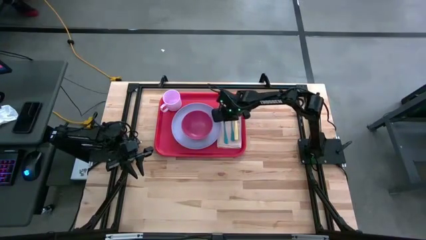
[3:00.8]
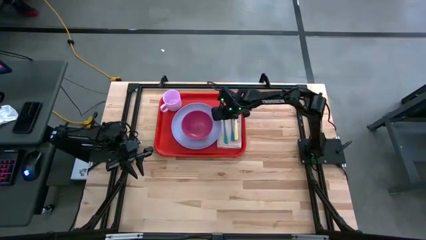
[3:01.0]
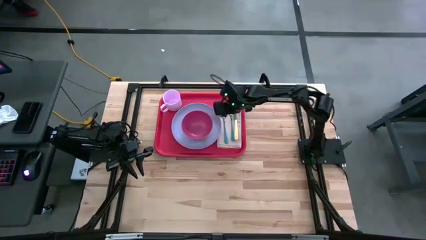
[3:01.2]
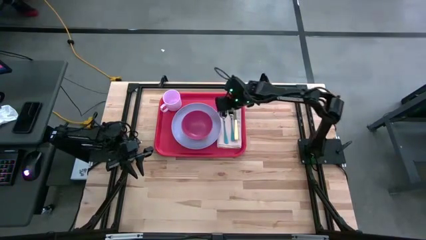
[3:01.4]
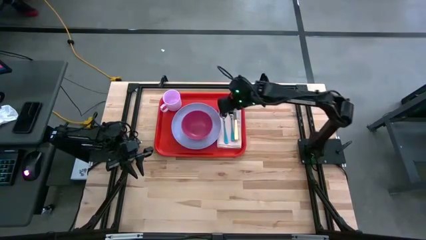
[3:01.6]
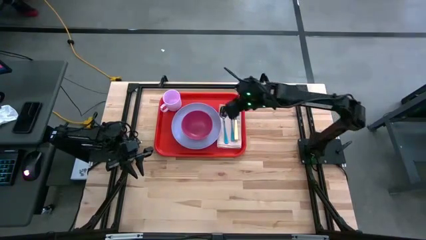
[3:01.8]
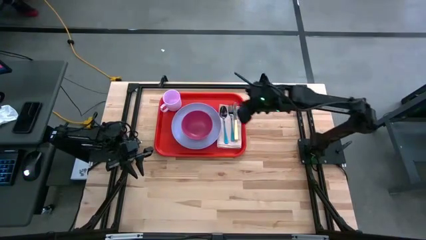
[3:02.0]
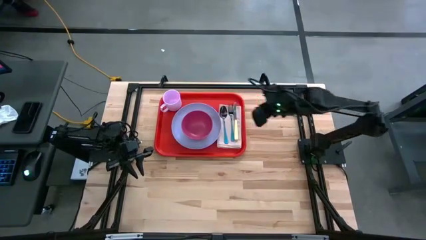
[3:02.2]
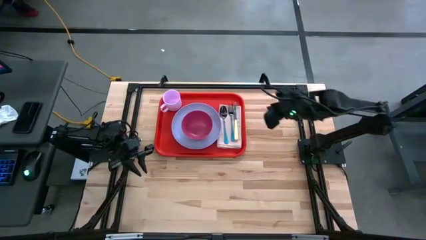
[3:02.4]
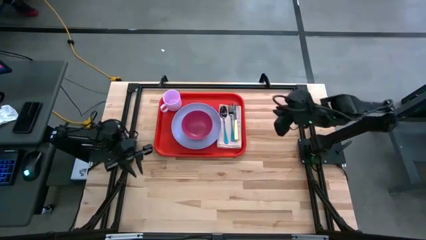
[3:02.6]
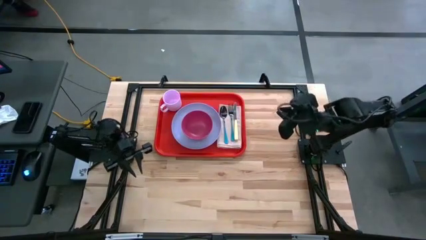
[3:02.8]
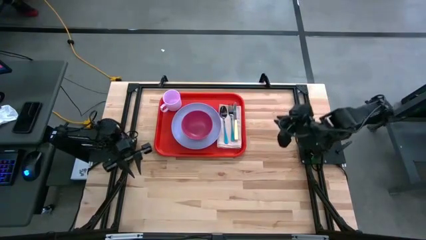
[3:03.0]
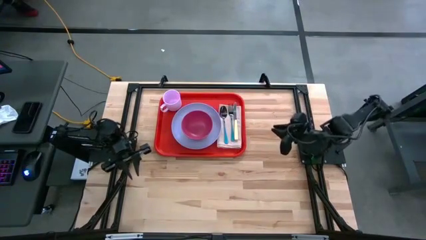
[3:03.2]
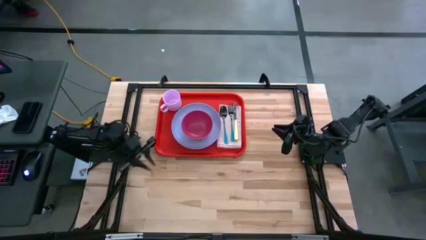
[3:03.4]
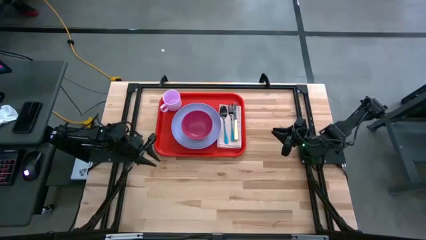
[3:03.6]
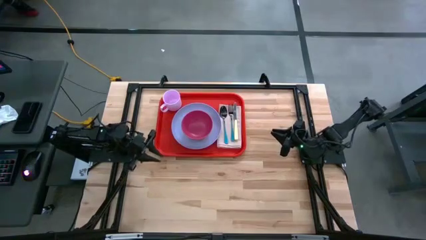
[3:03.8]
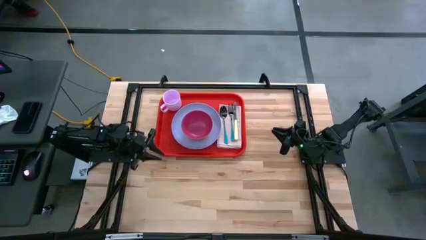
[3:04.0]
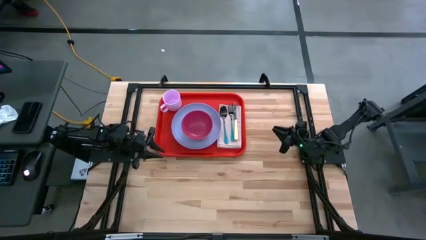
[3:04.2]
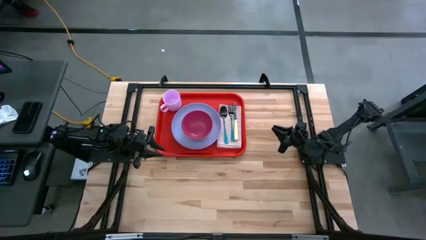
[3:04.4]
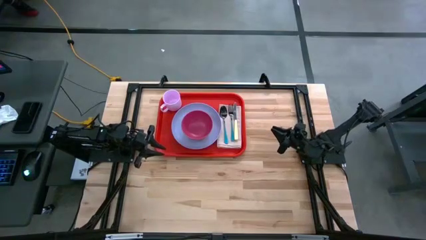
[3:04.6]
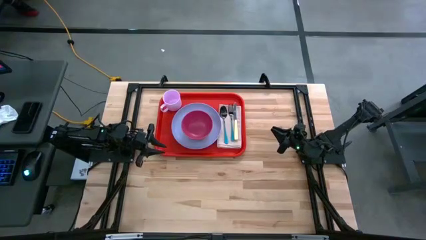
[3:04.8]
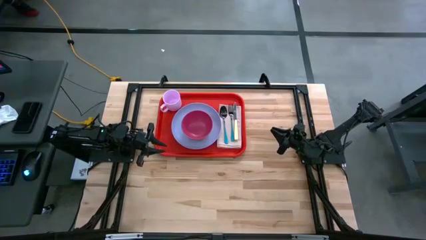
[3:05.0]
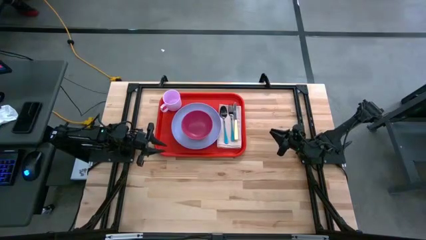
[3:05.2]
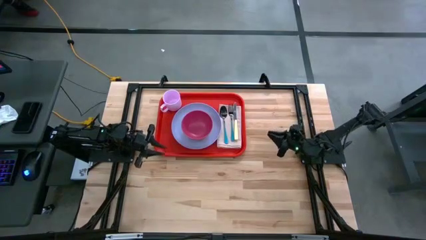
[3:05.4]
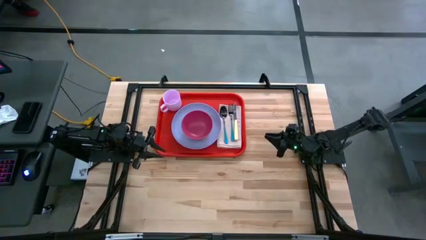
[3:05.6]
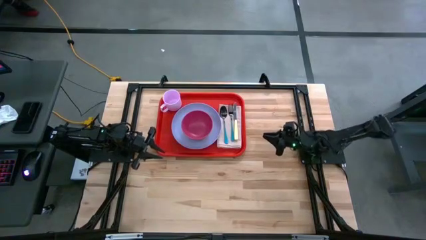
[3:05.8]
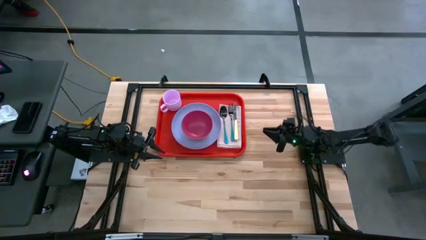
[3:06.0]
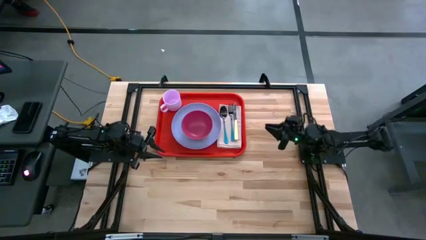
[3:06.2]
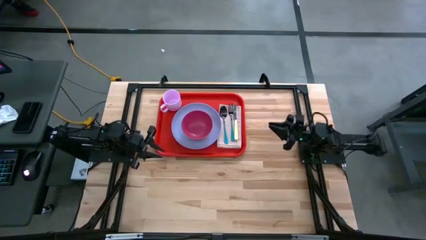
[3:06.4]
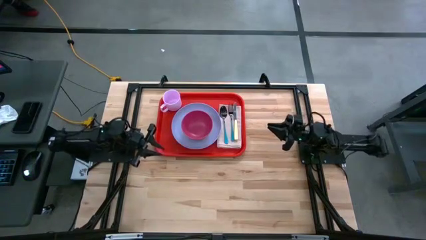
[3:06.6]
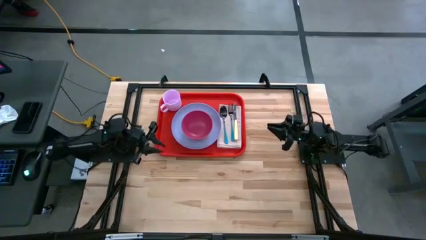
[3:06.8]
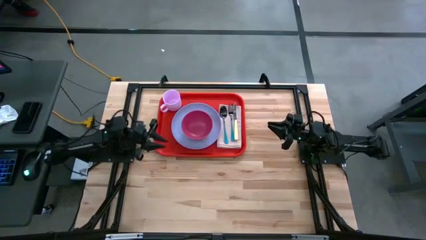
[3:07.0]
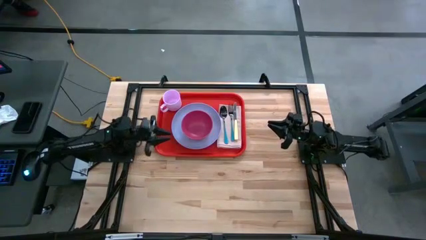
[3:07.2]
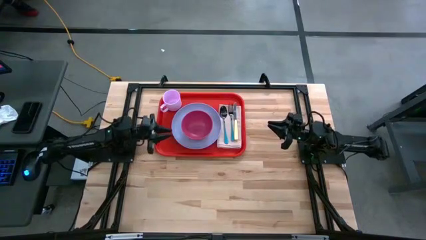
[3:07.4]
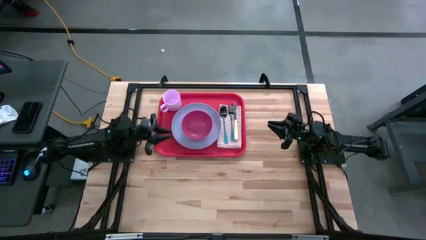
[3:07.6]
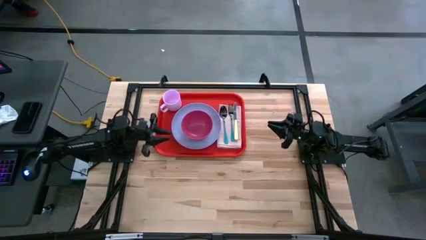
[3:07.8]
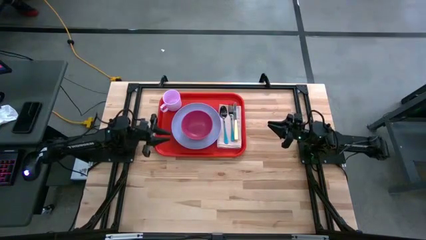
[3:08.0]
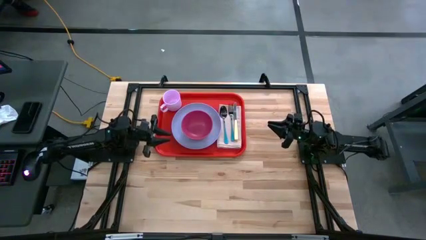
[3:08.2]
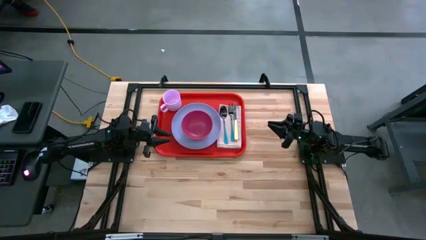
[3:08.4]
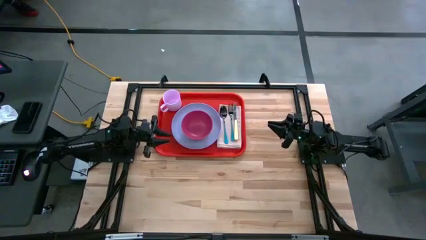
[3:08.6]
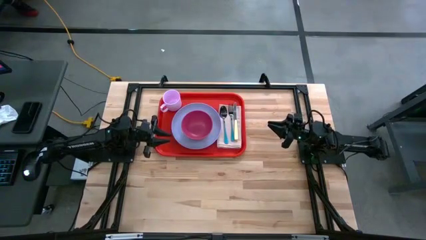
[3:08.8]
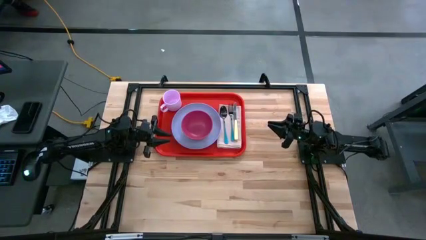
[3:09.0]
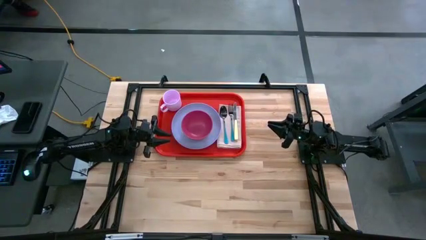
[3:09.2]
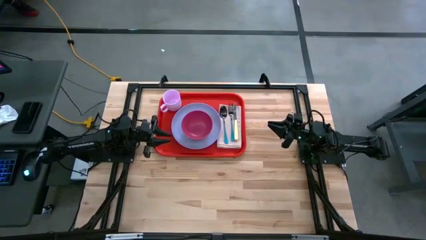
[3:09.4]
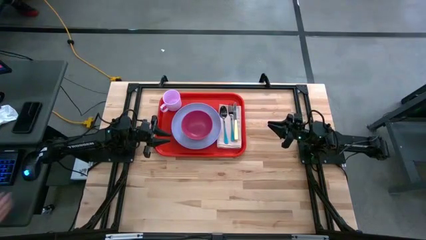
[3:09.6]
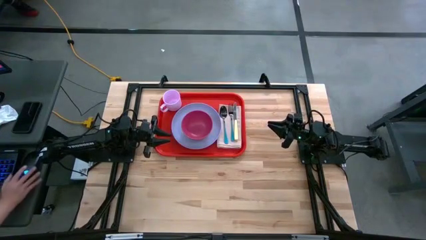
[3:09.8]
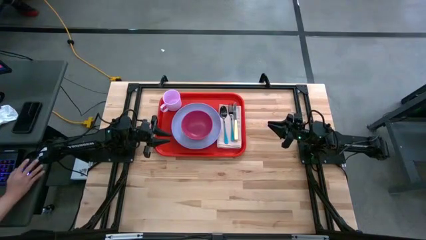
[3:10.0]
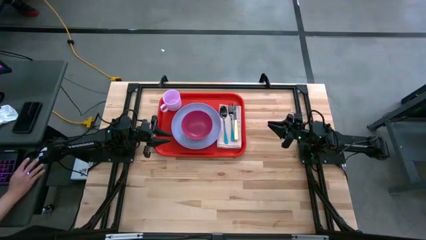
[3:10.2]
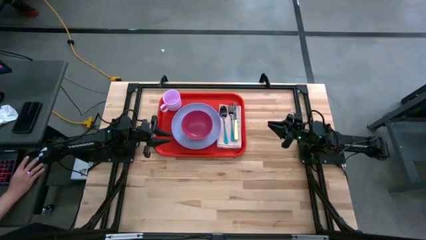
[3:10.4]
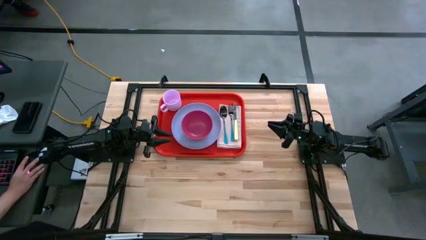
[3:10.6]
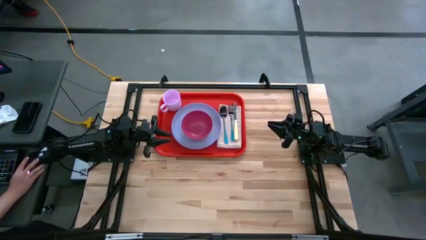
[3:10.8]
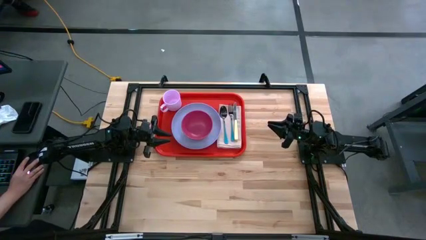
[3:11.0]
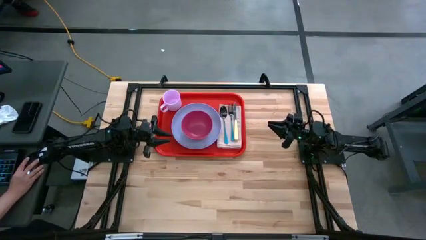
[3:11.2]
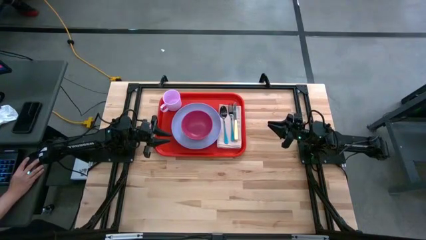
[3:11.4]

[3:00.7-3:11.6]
Task: Set up tray
Return to Home Position
